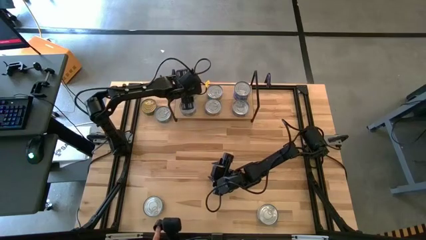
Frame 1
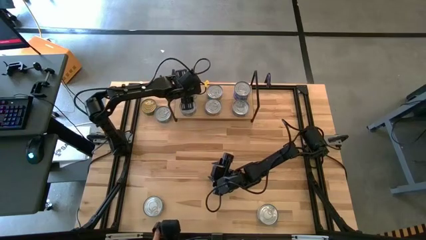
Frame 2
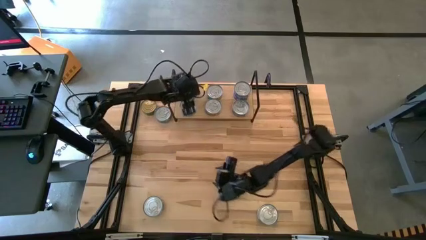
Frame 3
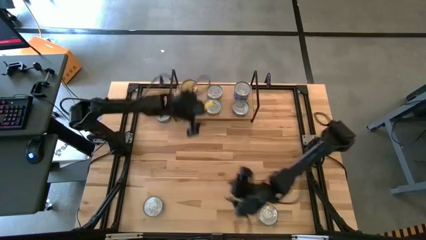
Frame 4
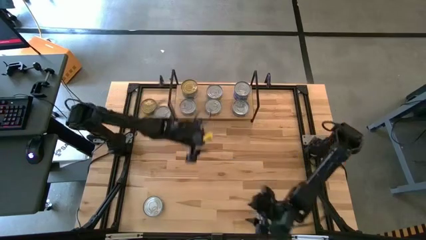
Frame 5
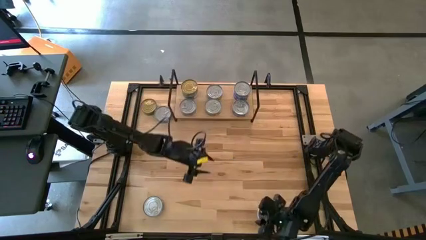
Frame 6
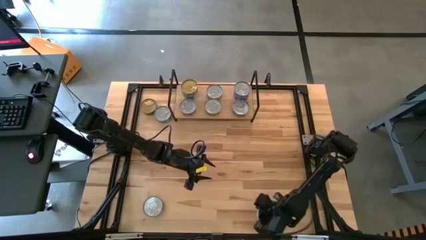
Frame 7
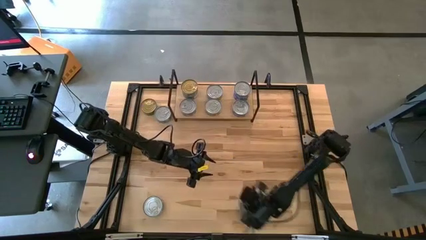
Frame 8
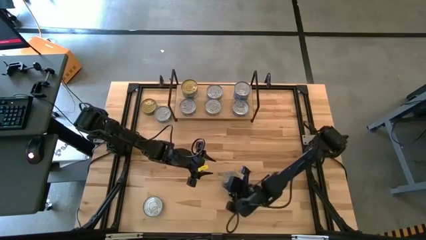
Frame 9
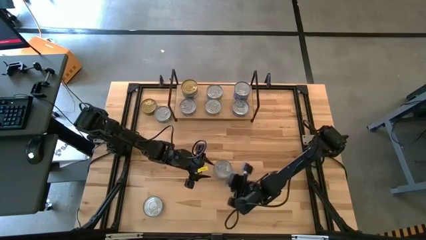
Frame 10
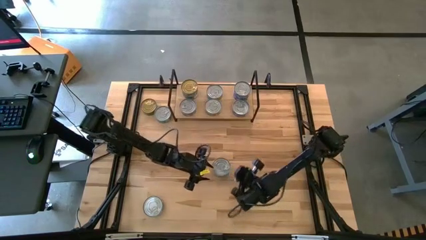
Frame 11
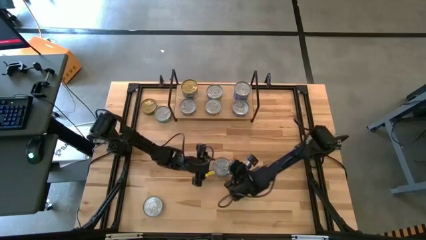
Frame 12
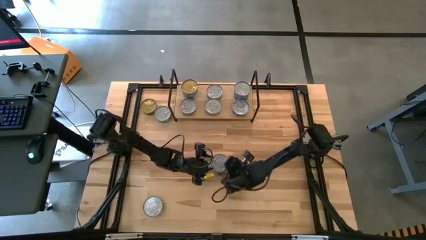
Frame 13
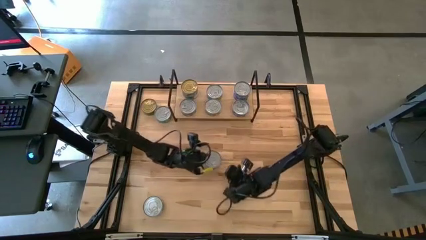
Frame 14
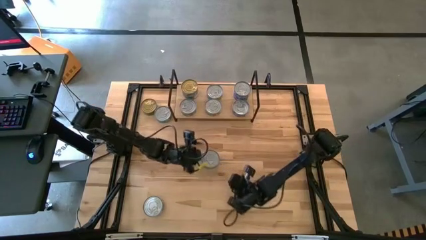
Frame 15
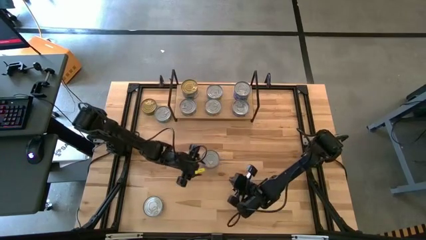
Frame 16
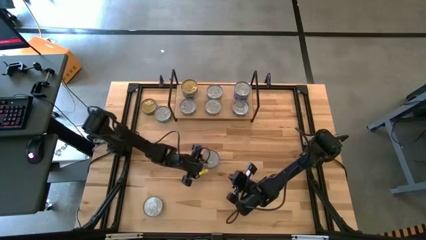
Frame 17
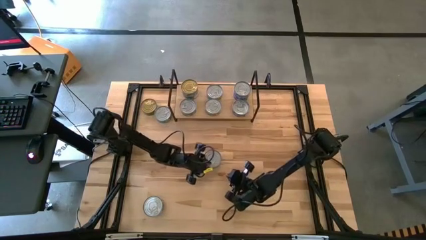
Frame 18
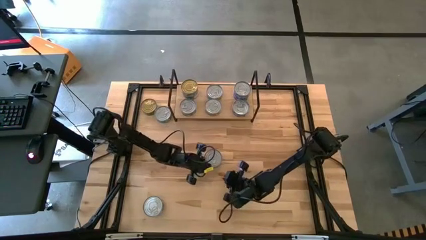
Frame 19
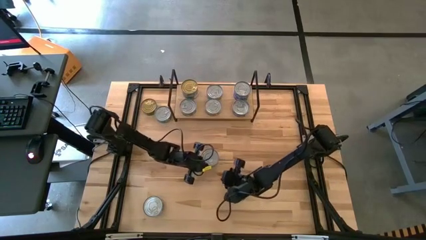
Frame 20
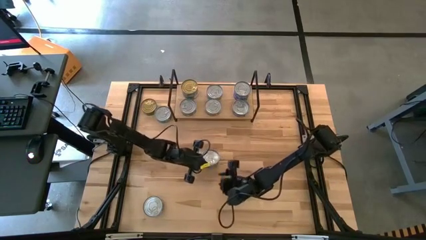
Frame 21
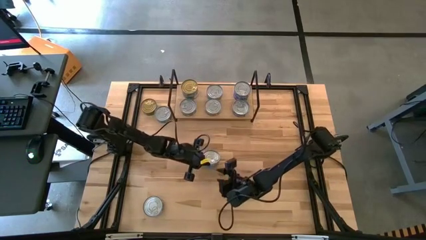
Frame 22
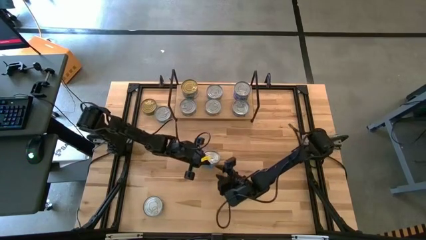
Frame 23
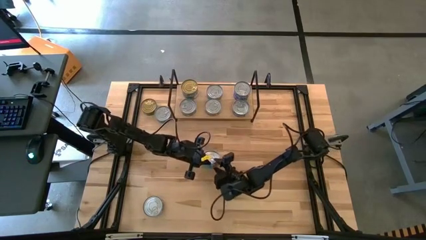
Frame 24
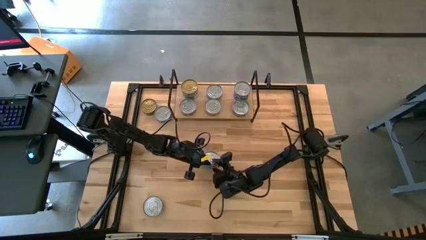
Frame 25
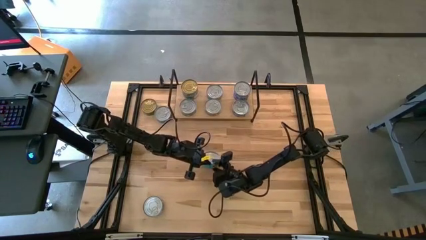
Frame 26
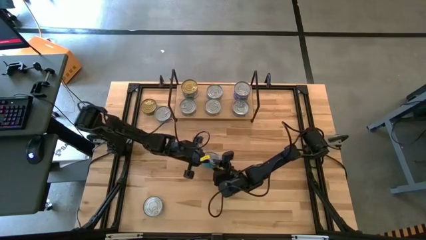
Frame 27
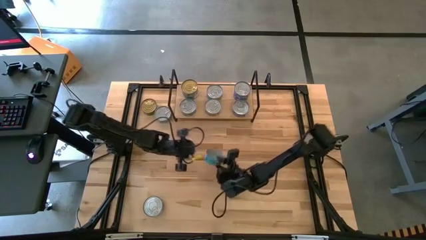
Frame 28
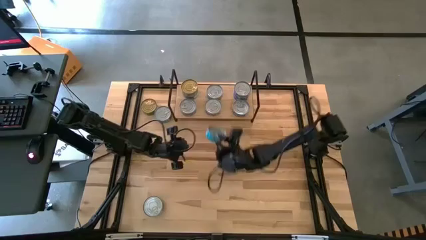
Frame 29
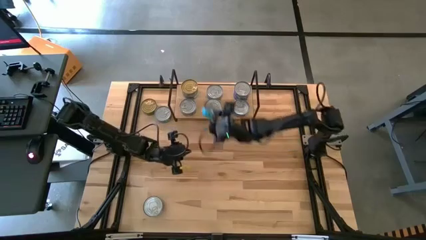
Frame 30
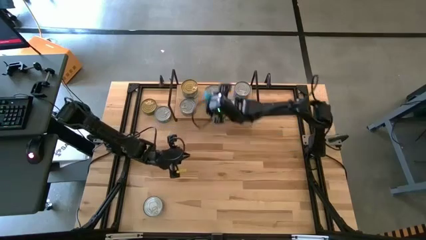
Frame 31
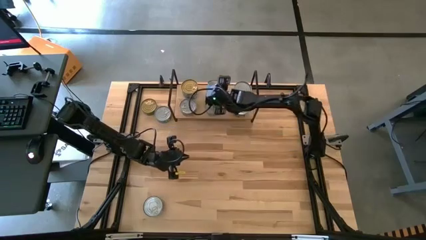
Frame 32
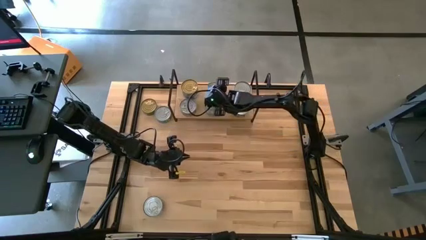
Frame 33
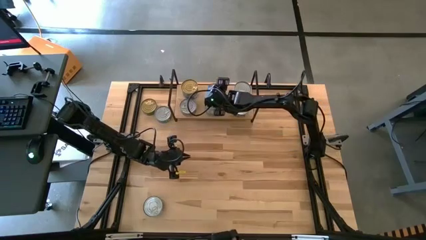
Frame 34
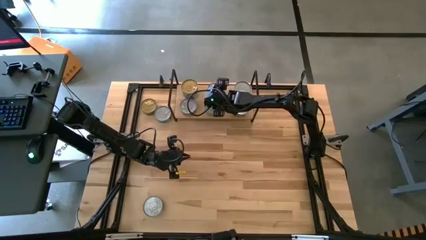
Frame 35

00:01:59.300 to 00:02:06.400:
Task: Stack canned seafood by type on shelf
Stack the yellow blue tuna can on top of the yellow blue tuna can on the shelf

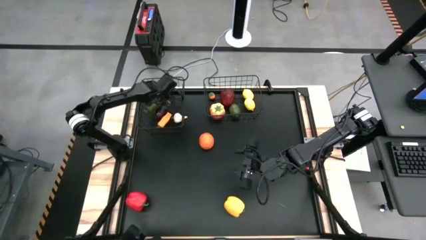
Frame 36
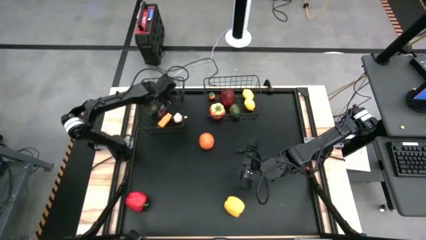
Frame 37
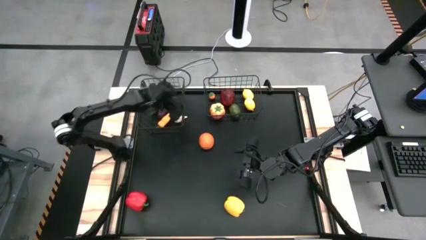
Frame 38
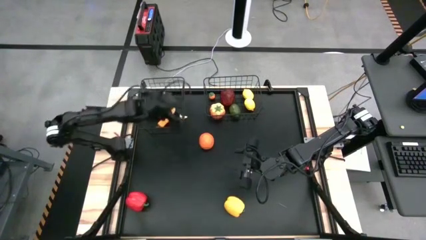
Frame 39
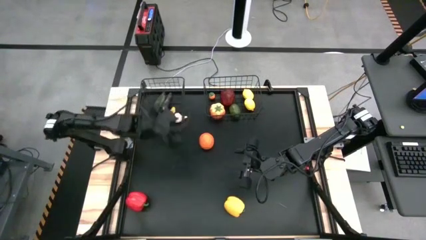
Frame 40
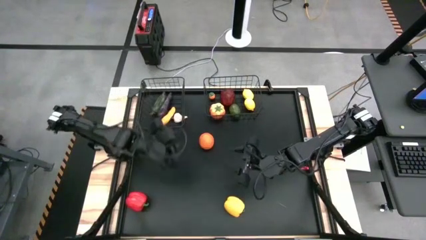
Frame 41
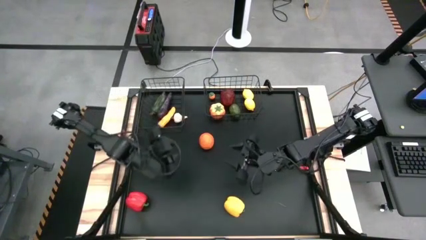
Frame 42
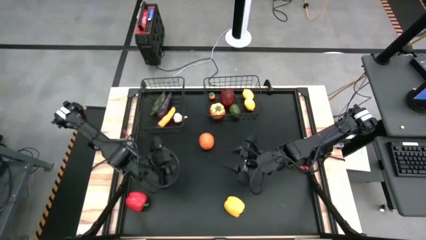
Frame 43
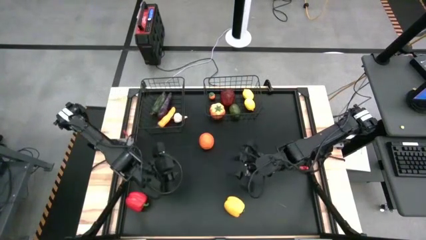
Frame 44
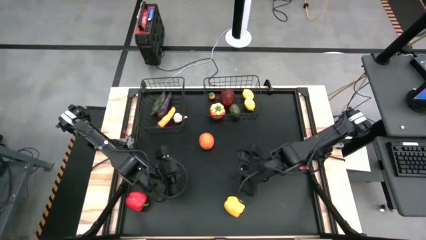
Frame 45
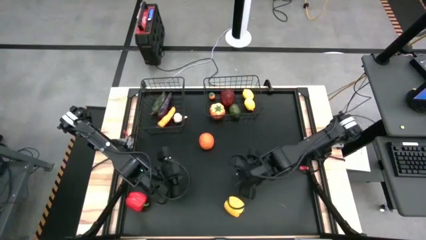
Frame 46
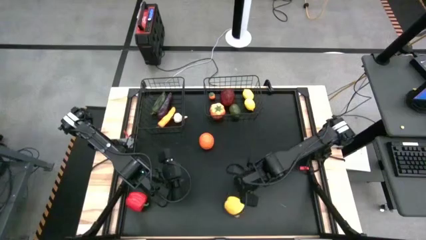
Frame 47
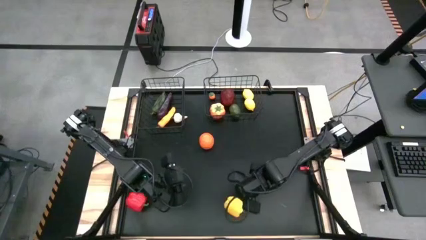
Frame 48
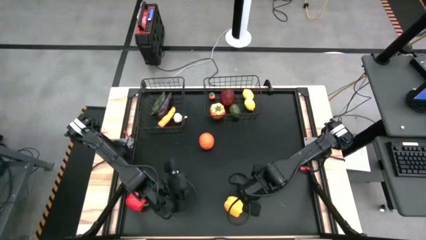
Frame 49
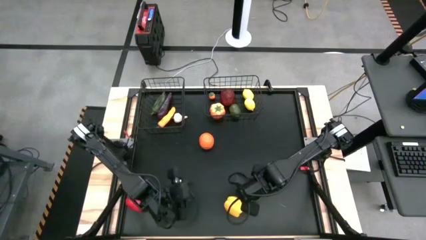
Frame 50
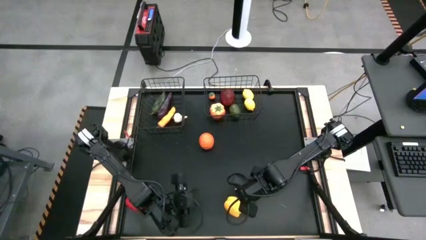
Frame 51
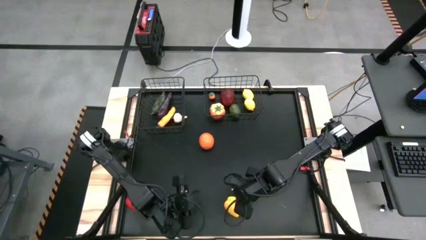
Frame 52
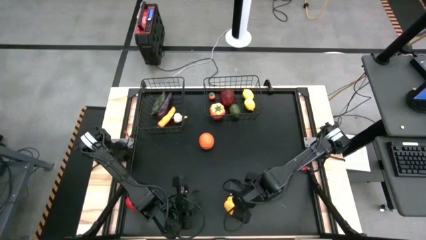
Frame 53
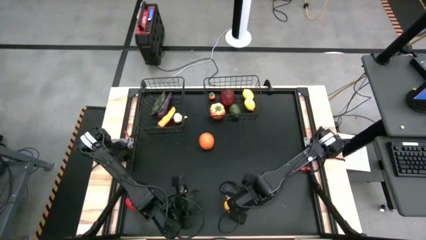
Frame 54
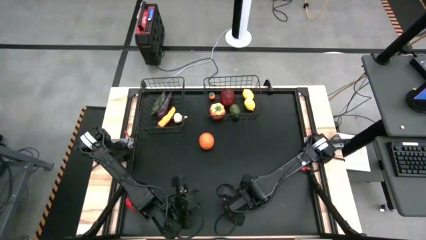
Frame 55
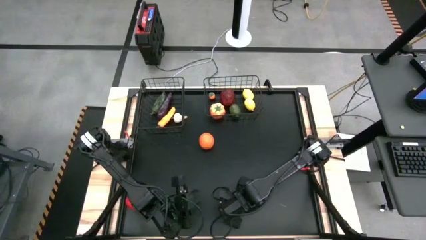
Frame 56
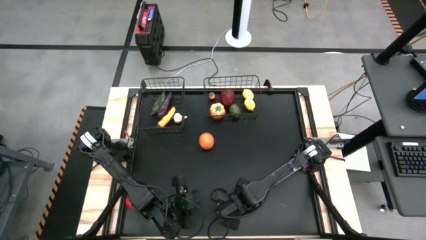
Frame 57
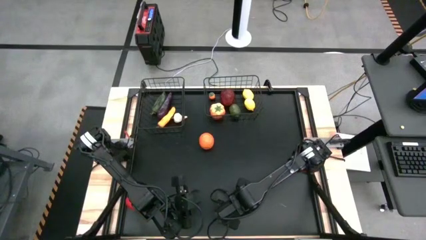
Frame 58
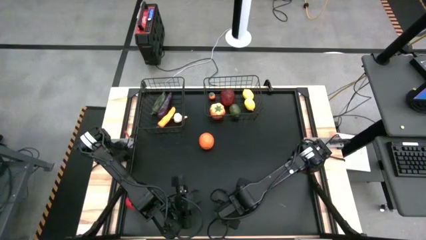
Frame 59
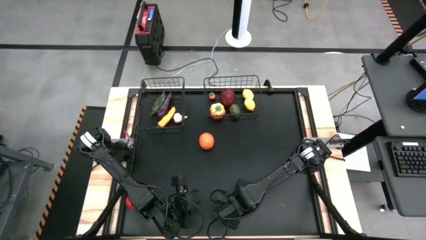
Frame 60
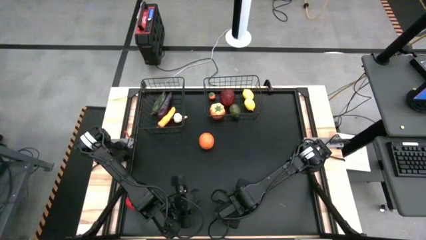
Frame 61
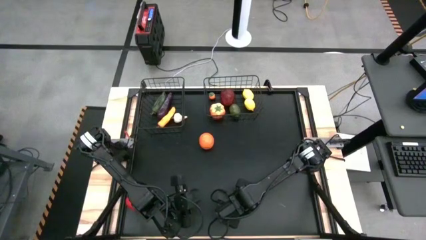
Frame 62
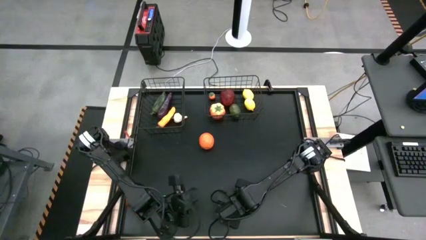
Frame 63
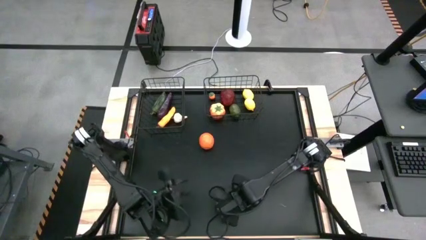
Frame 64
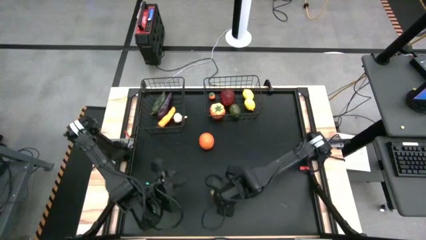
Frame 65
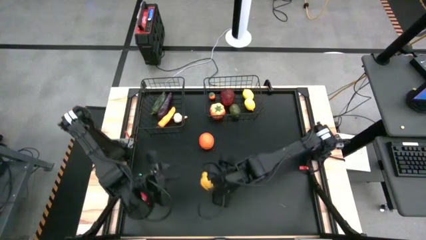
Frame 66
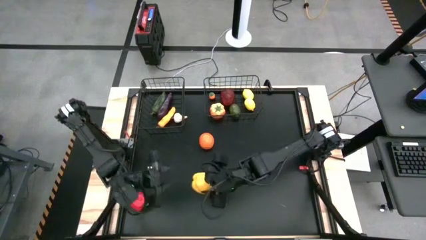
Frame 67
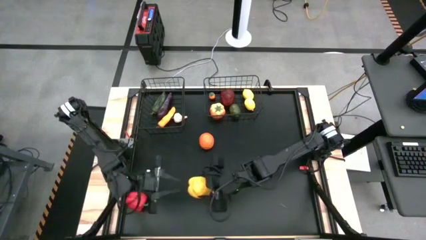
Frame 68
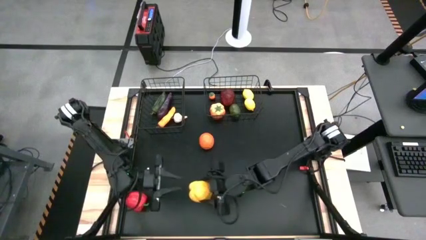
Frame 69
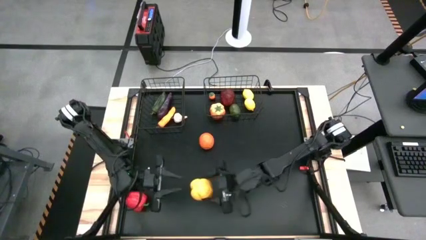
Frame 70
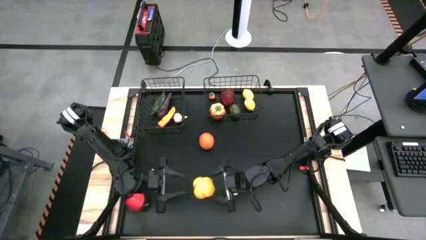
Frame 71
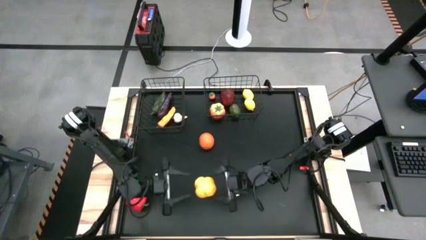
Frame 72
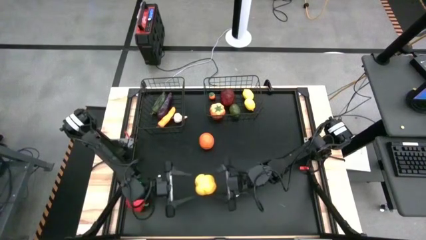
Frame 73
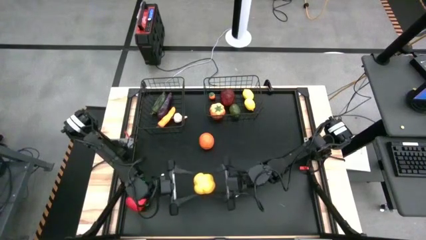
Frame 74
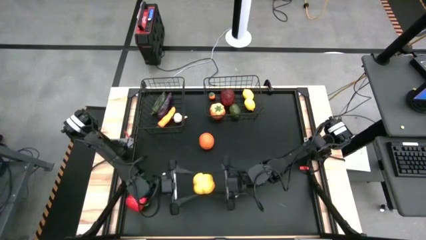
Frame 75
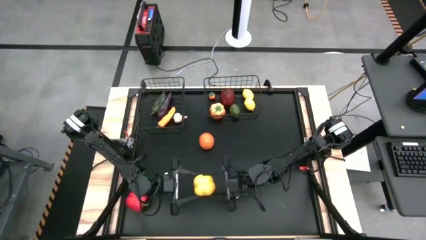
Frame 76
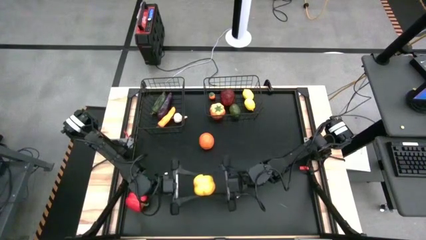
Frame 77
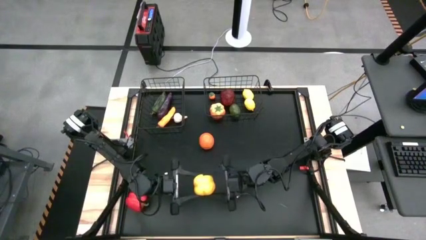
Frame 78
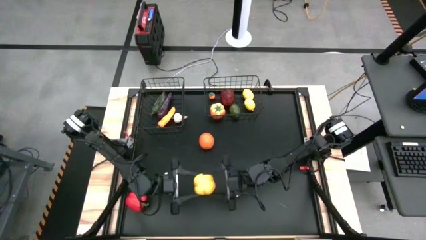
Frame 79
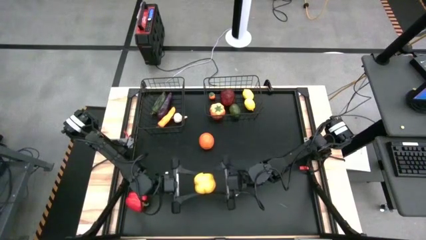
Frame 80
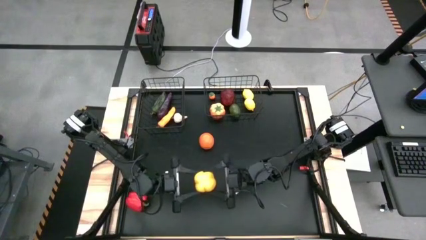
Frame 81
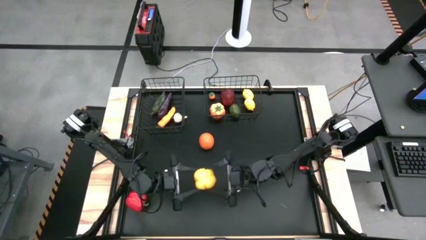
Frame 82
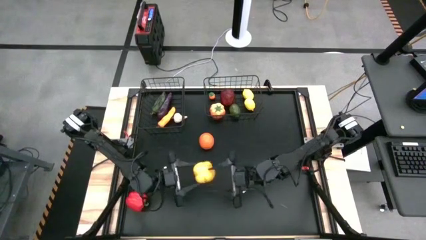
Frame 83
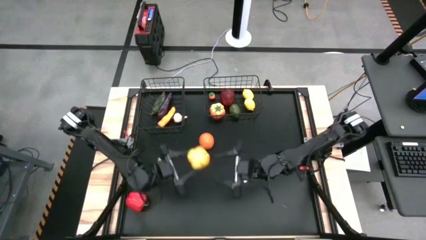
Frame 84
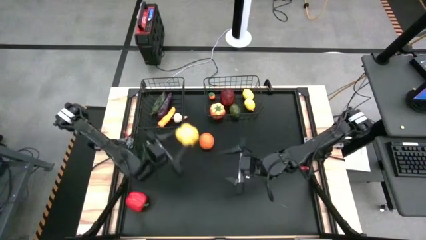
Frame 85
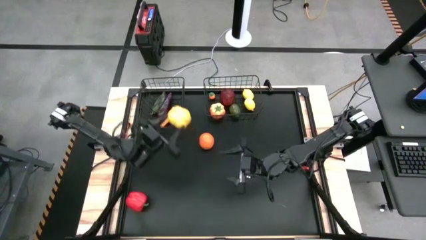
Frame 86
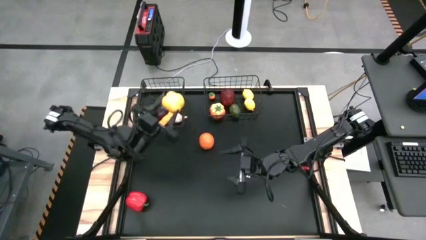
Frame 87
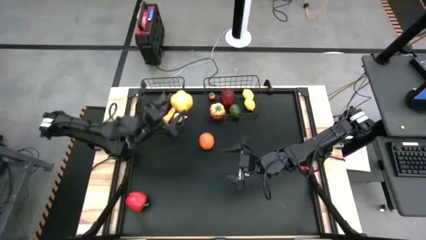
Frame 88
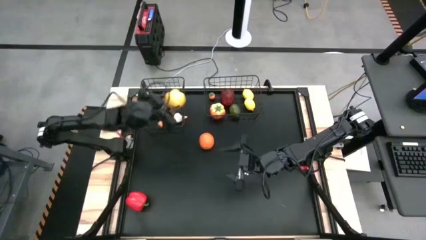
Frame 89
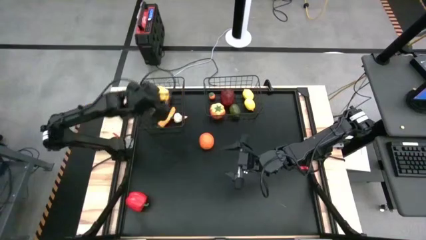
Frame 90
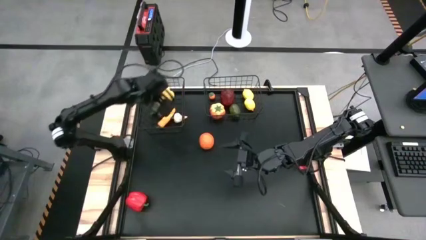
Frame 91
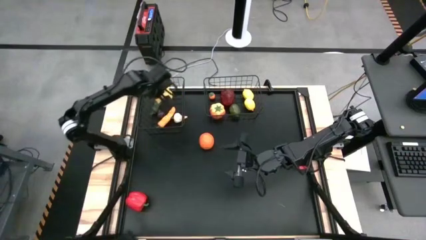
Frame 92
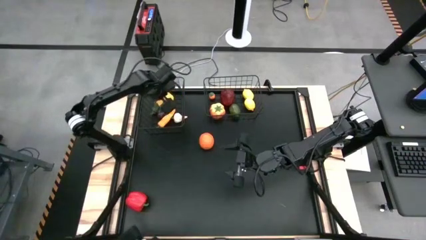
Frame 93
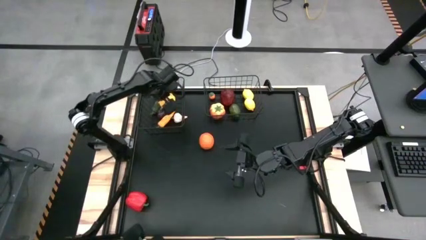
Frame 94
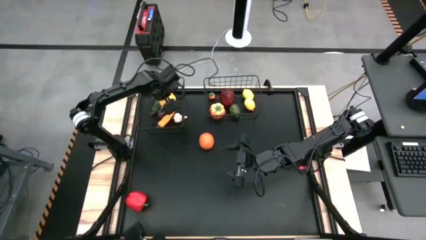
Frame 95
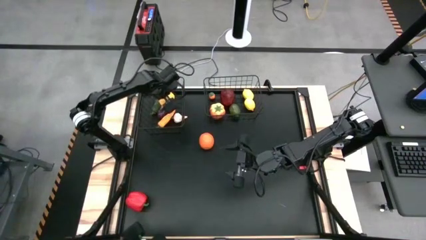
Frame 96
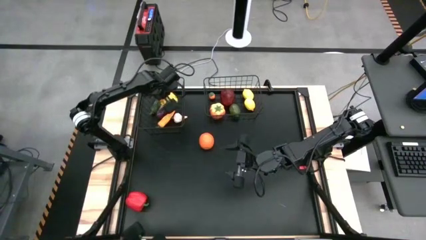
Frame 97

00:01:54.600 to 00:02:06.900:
Task: Sort produce into baskets
Put the yellow bell pepper into the left black wire basket
